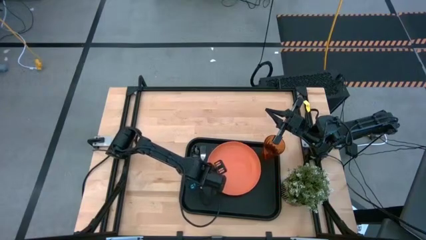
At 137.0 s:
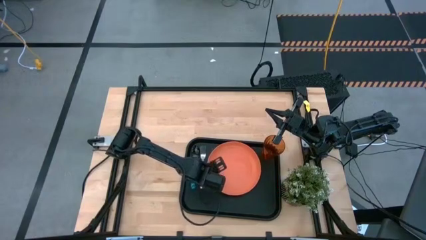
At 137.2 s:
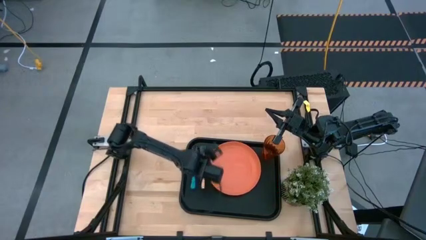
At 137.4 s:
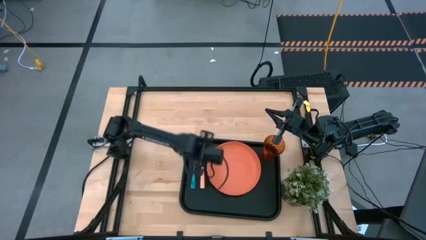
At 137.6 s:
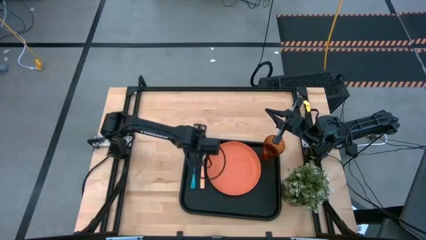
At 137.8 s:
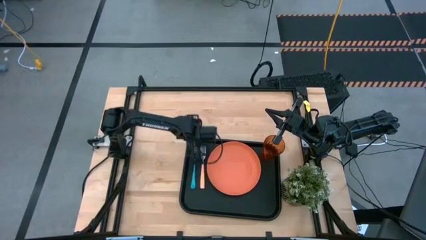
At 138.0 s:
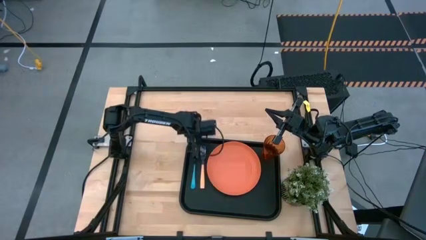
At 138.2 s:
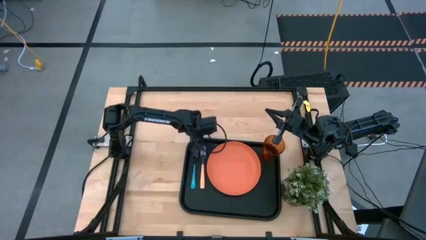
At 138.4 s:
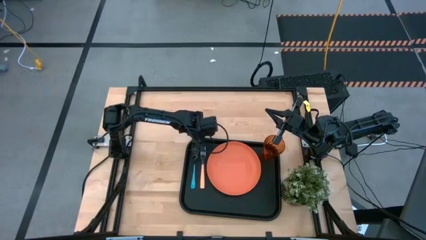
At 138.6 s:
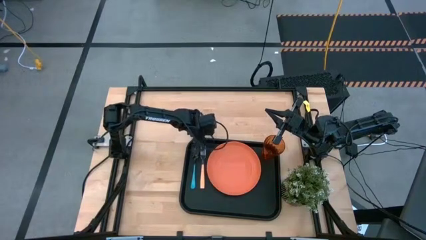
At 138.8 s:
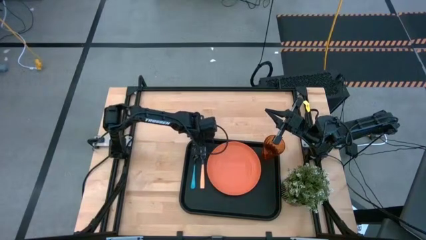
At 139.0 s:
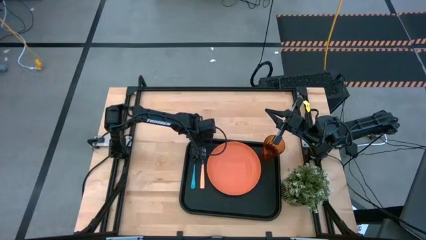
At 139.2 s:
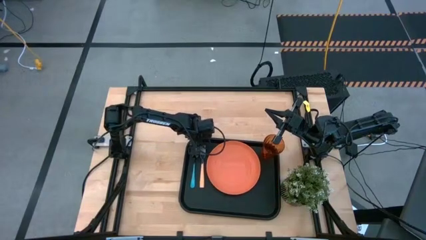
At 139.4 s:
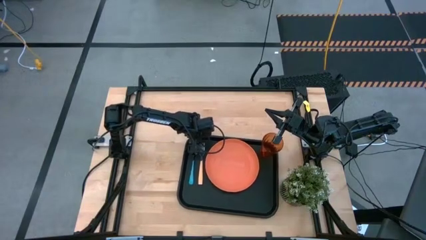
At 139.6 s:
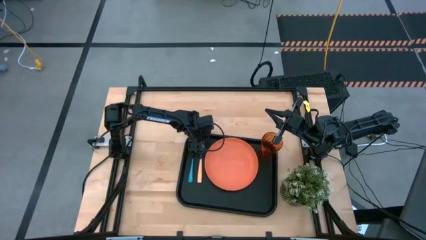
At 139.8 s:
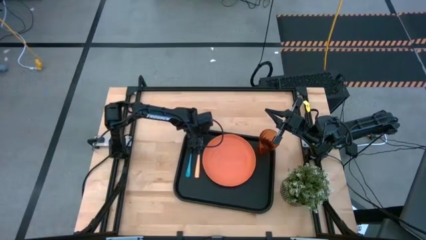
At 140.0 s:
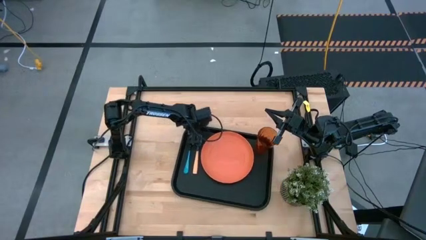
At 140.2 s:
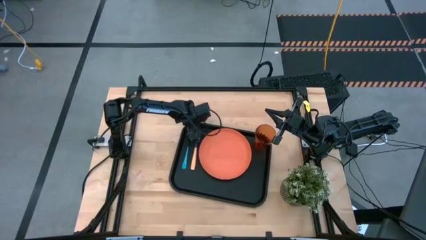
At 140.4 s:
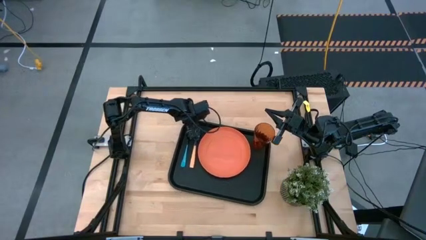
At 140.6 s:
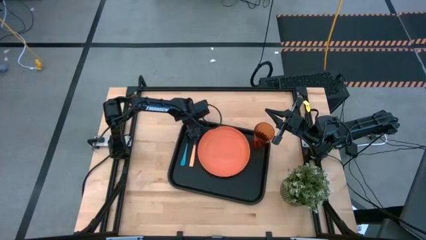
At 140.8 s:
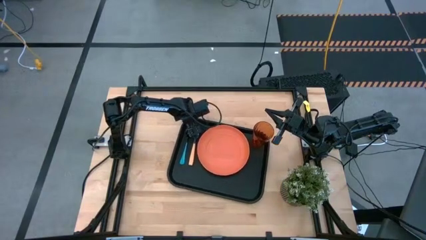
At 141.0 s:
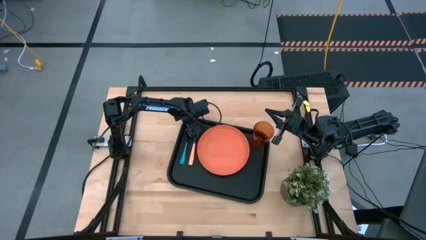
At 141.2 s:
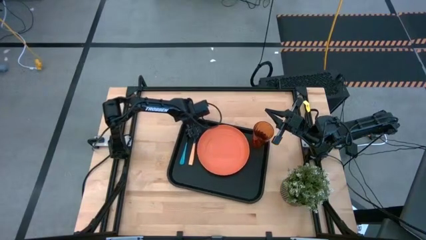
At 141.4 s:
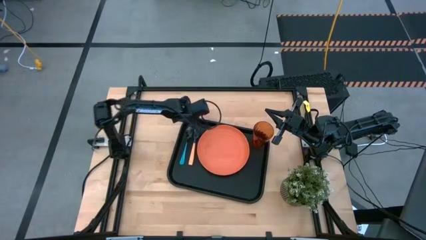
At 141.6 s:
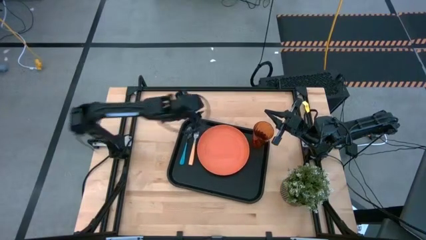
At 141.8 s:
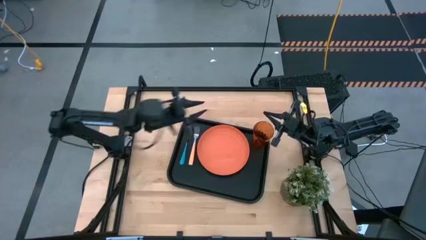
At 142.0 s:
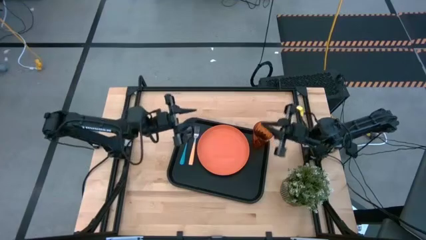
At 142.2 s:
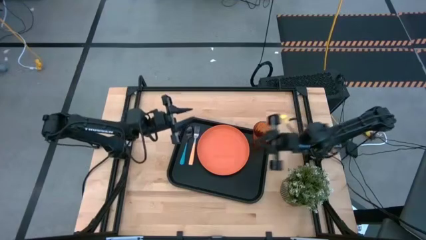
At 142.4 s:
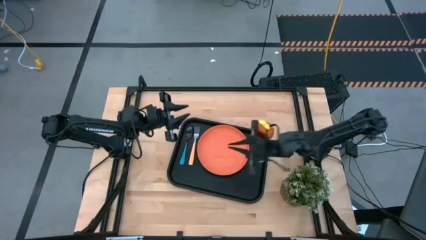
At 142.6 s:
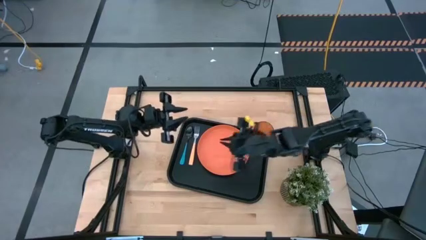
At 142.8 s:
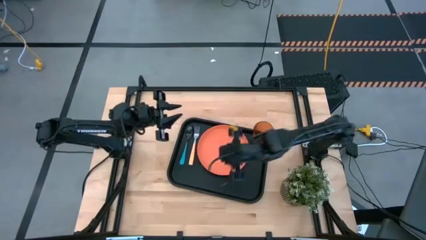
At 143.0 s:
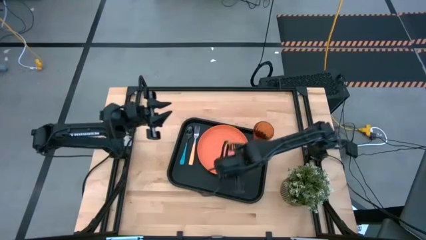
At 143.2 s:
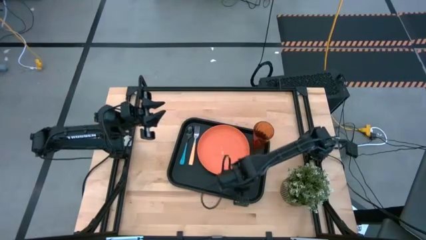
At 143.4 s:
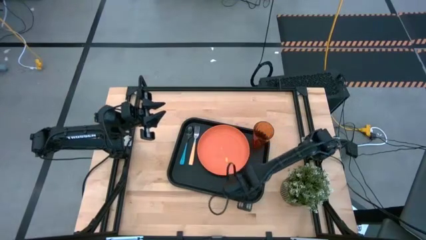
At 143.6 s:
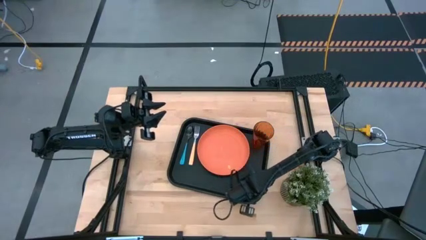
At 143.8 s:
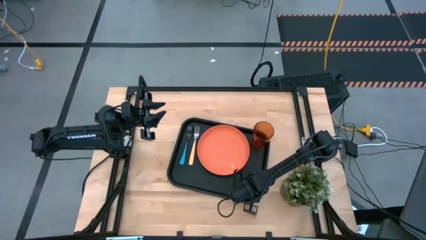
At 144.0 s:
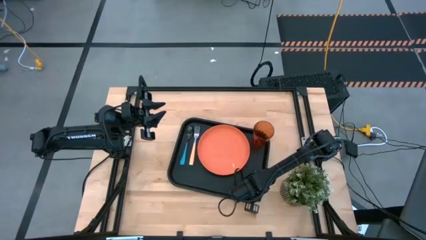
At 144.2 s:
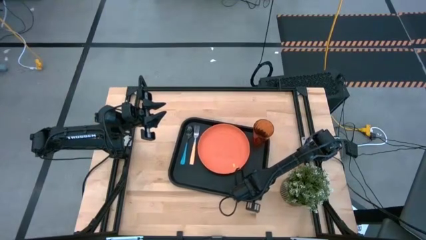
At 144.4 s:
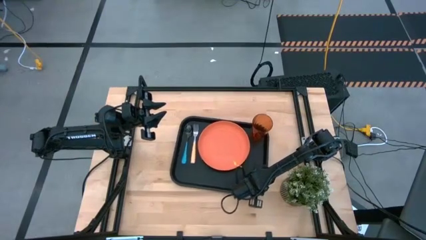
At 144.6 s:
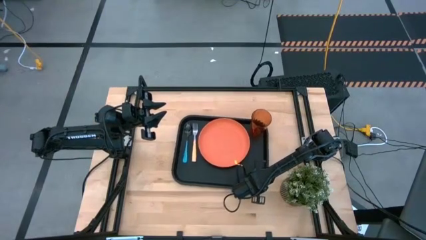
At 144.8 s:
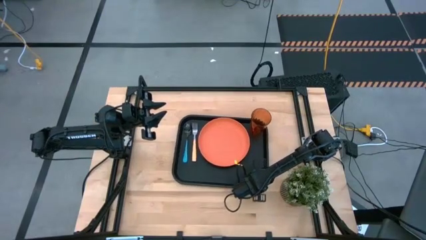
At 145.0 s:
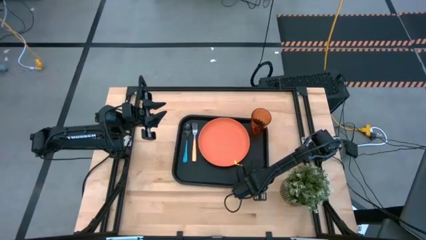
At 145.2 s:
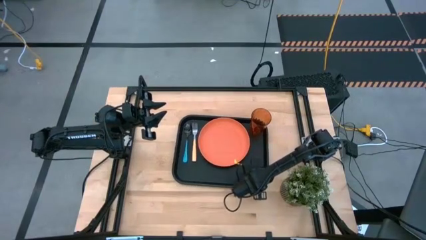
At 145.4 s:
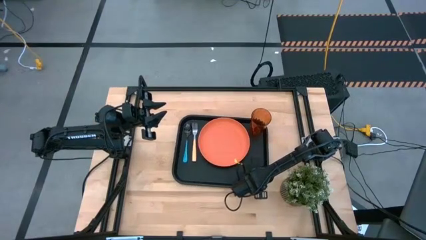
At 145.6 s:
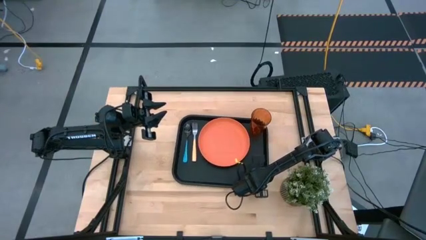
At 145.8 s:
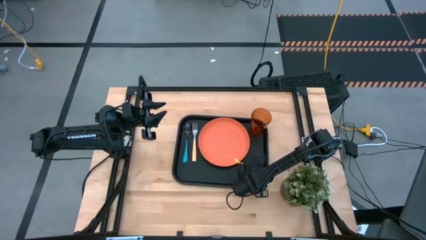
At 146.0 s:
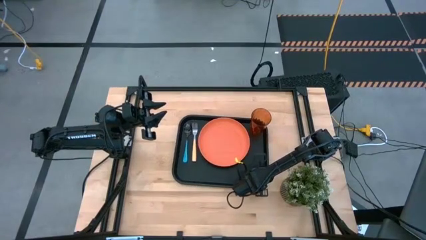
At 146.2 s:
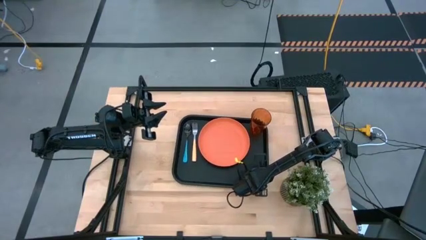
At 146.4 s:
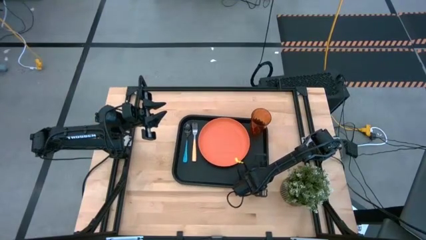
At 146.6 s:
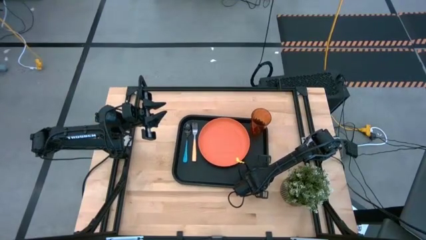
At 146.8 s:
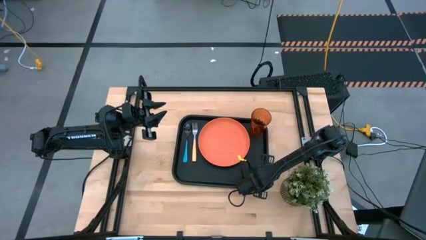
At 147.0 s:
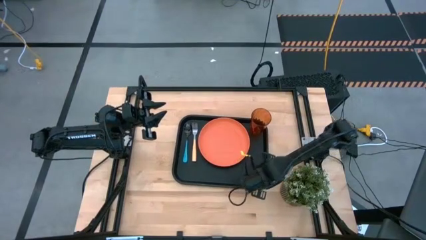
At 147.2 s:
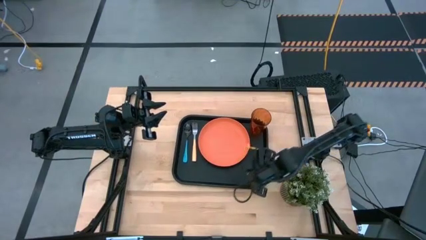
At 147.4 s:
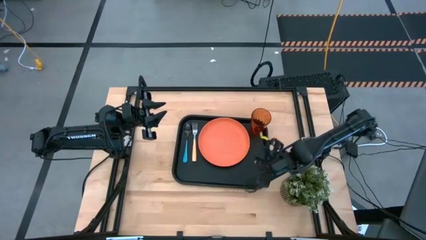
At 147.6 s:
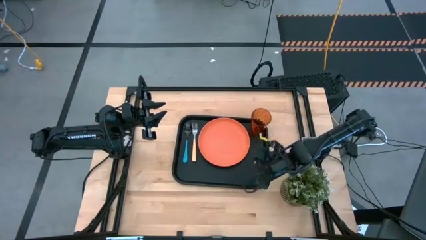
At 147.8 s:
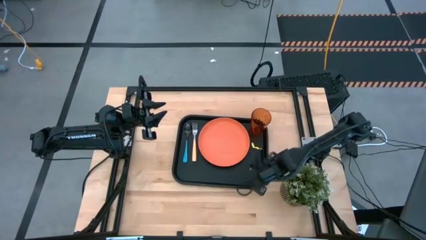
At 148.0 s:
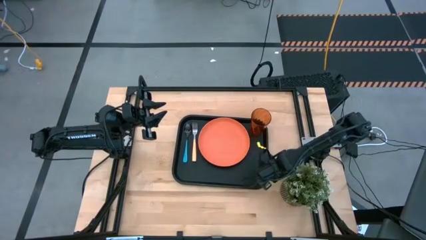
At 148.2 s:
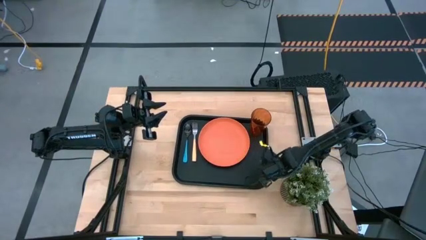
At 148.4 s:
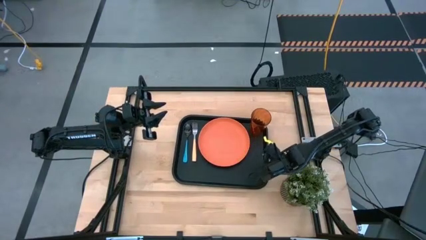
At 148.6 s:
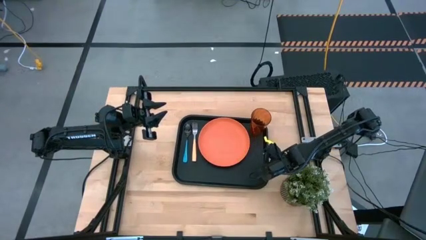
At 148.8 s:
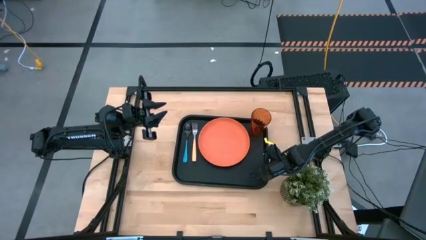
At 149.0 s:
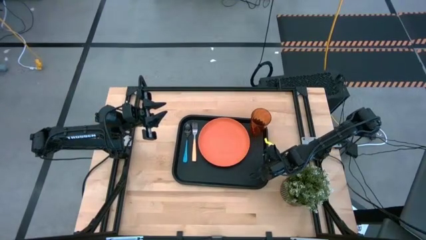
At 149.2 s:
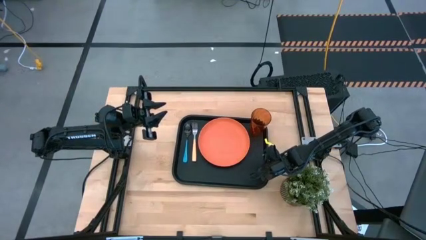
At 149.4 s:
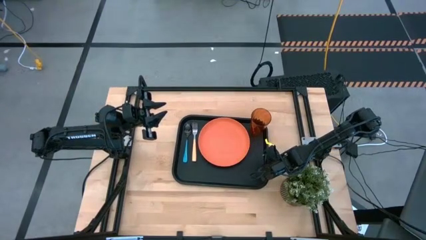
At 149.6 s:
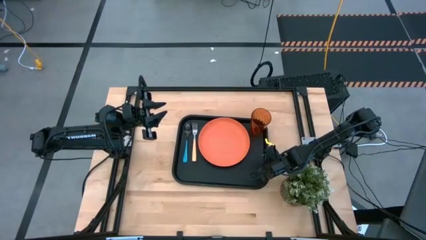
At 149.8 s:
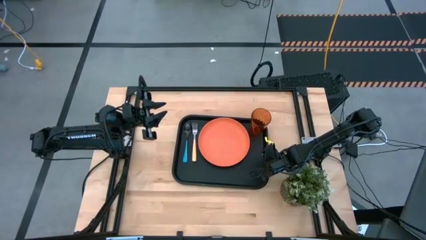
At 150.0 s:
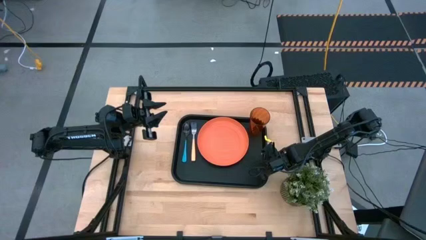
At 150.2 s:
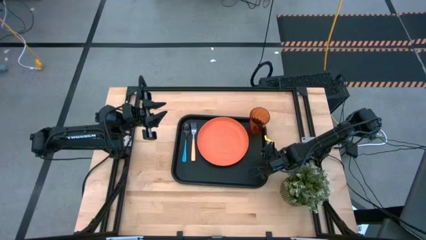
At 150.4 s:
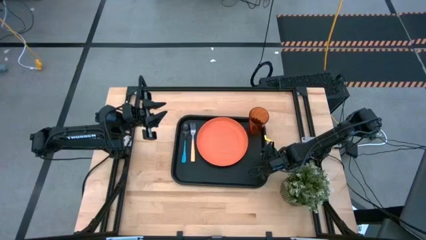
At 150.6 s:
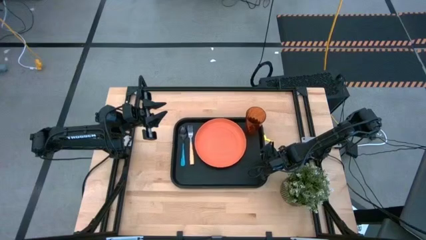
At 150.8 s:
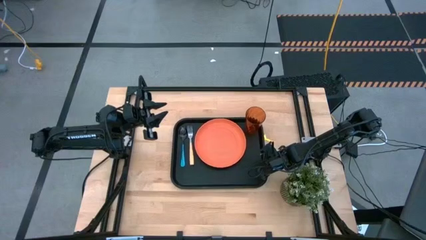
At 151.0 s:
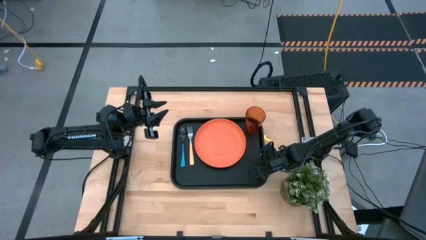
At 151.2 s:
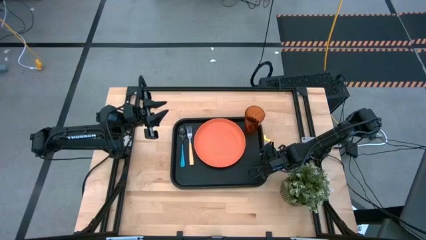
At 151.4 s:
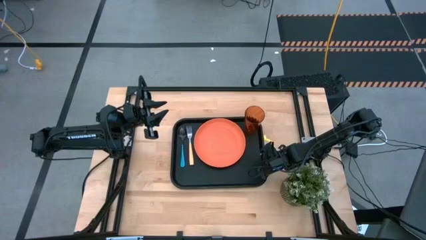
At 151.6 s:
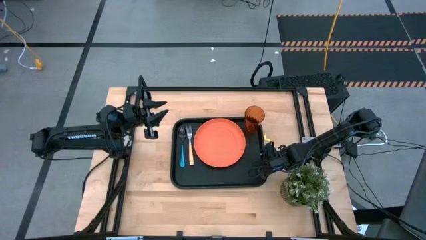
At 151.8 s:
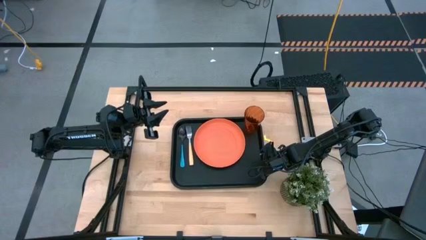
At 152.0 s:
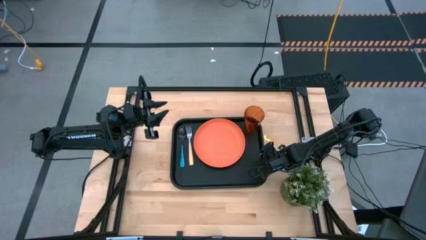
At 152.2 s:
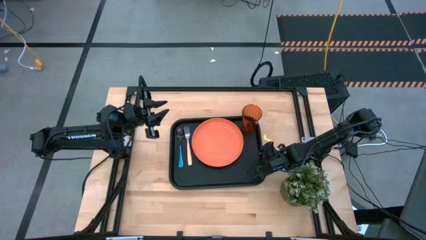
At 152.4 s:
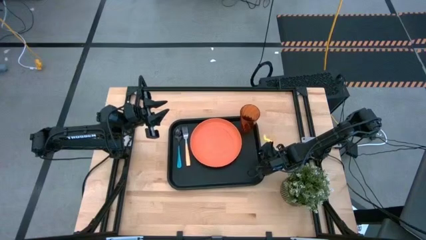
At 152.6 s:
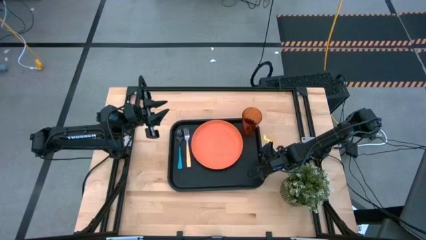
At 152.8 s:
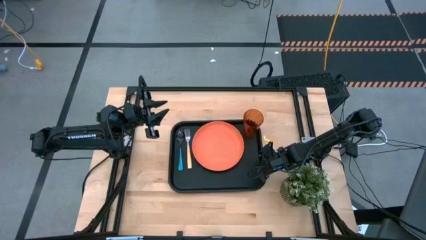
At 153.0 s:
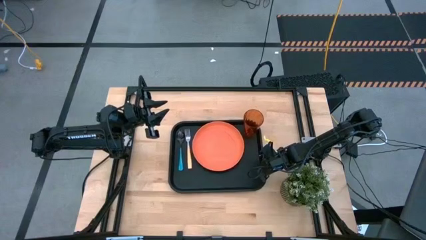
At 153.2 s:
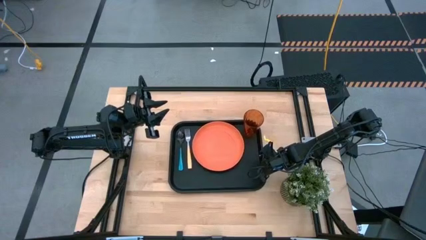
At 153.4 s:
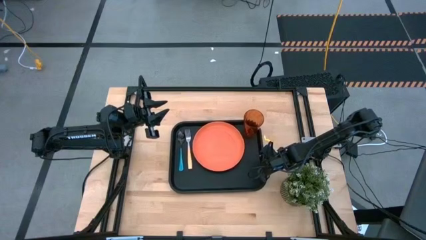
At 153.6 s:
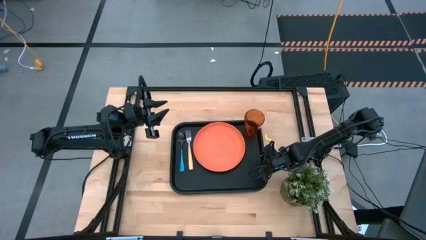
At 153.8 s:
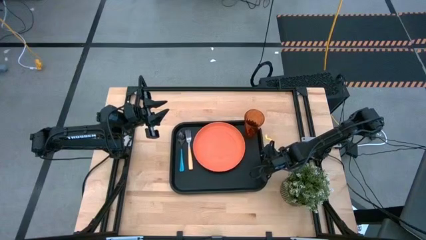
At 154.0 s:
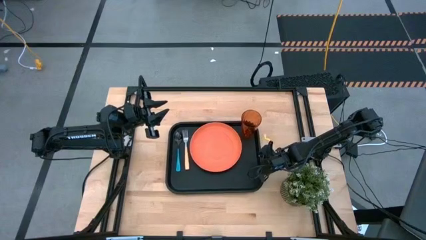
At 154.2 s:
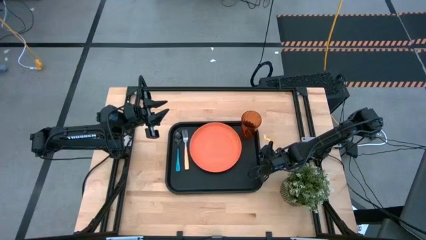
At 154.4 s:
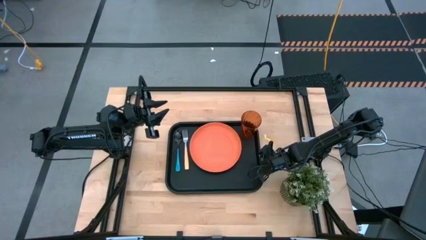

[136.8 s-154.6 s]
Task: Pick and place plate/cup/fork/spoon on tray
Adjust the black serving tray
